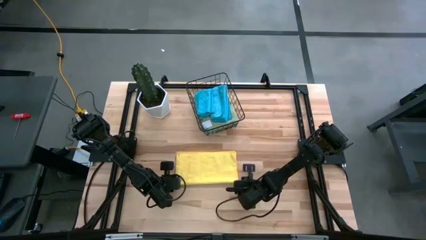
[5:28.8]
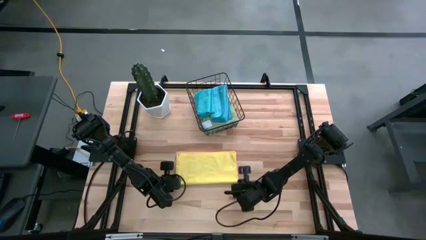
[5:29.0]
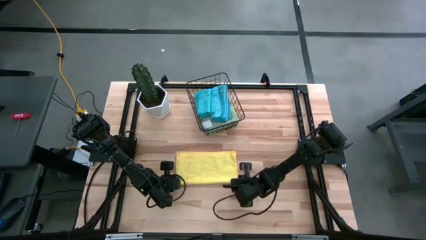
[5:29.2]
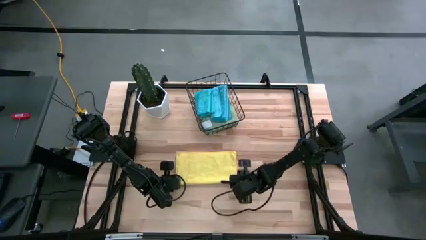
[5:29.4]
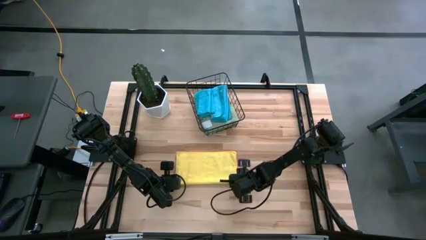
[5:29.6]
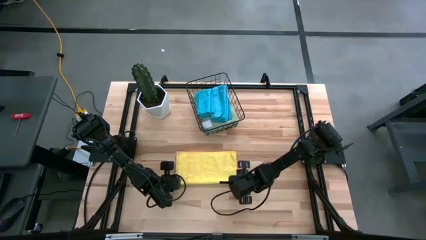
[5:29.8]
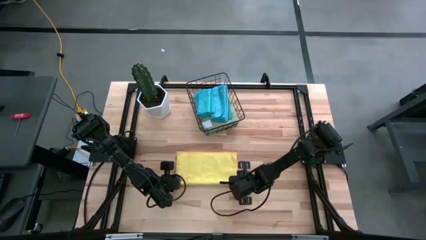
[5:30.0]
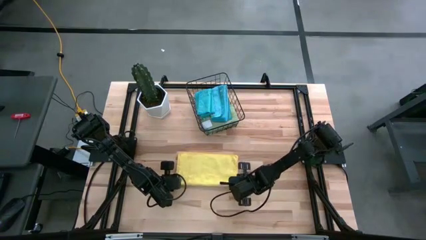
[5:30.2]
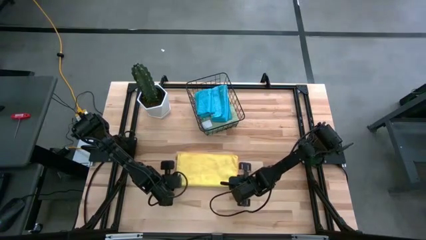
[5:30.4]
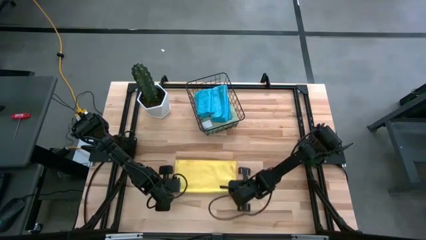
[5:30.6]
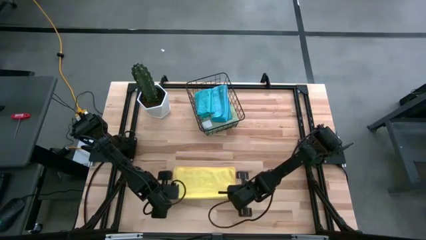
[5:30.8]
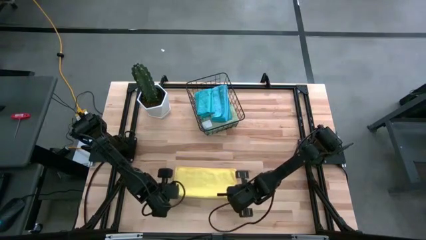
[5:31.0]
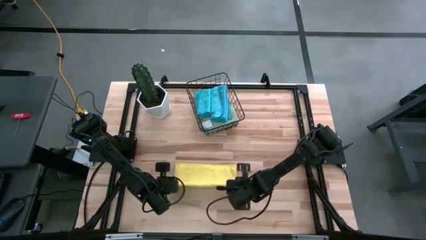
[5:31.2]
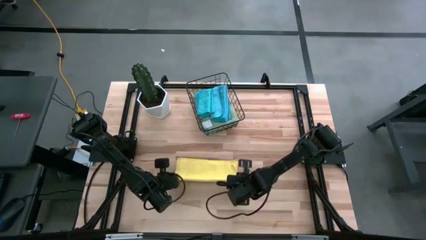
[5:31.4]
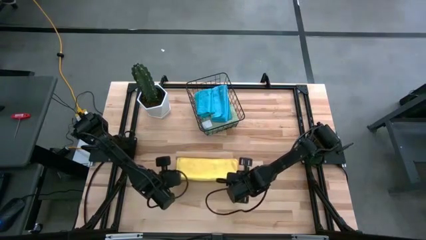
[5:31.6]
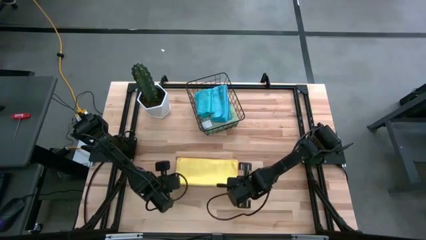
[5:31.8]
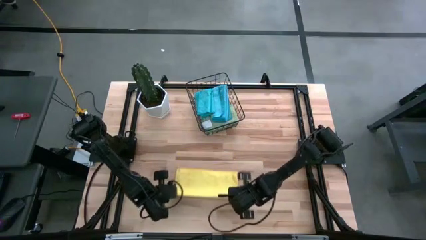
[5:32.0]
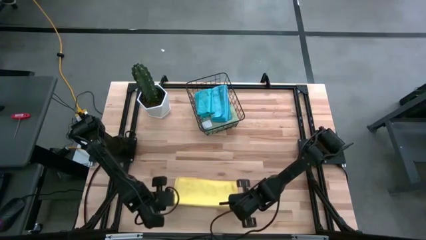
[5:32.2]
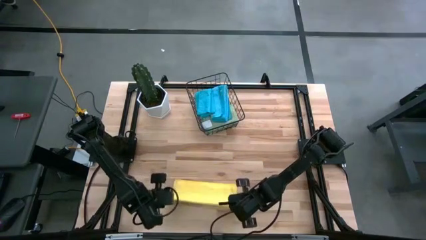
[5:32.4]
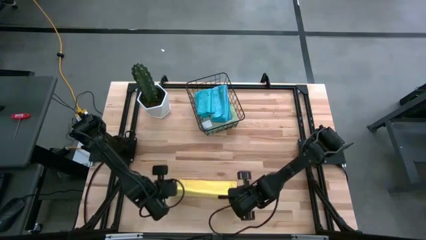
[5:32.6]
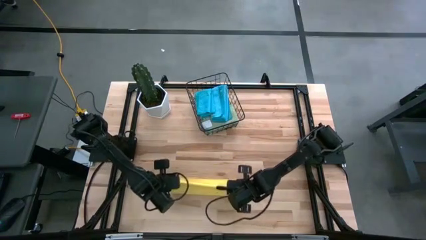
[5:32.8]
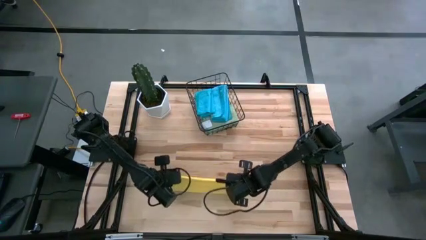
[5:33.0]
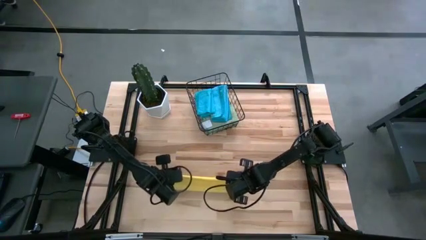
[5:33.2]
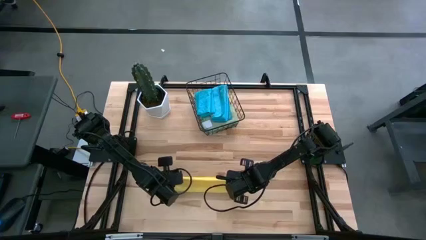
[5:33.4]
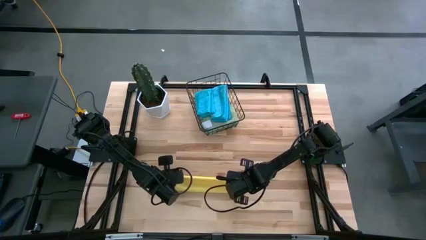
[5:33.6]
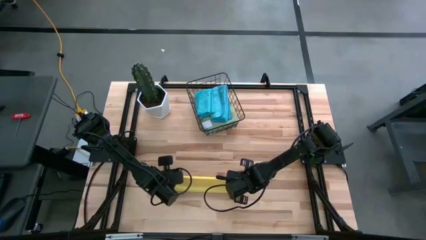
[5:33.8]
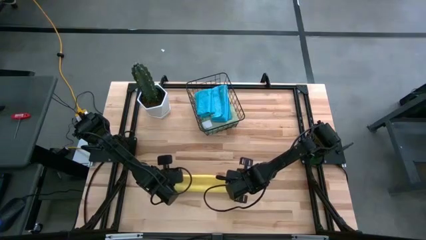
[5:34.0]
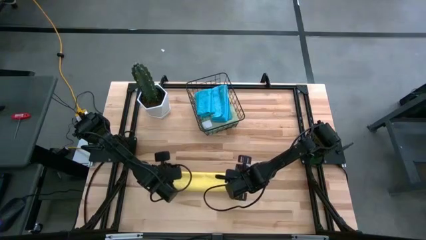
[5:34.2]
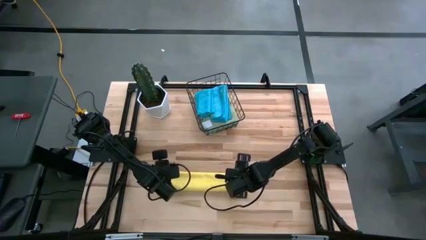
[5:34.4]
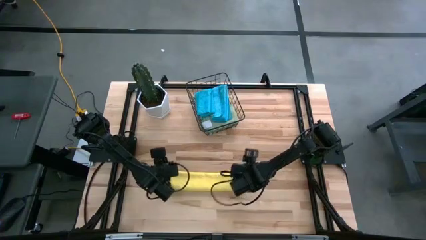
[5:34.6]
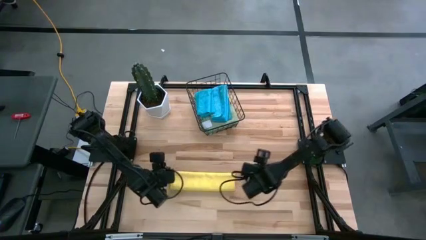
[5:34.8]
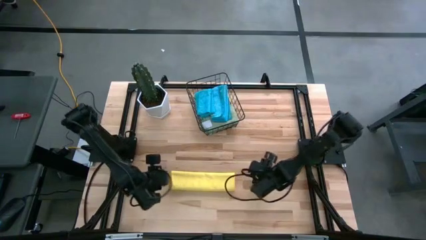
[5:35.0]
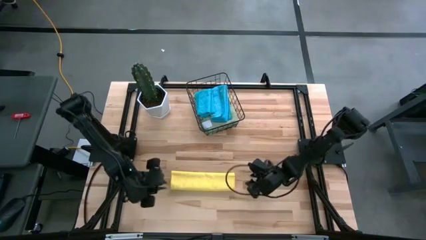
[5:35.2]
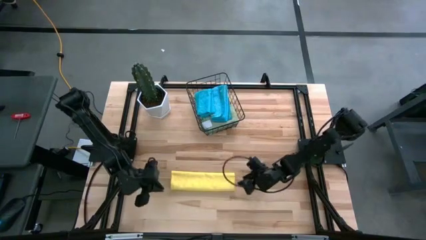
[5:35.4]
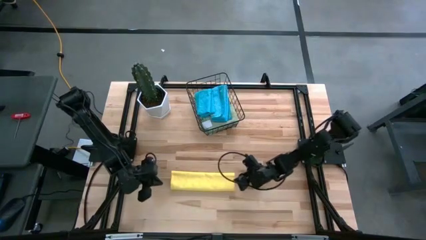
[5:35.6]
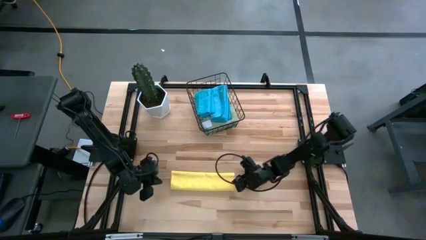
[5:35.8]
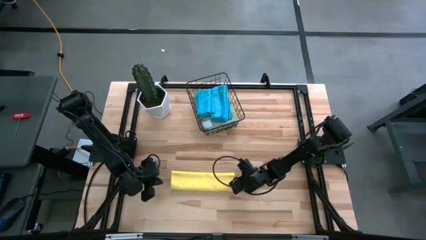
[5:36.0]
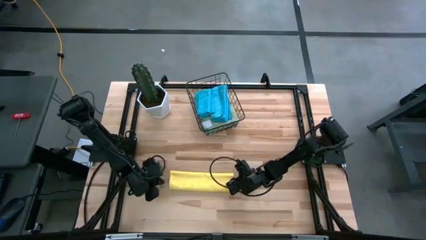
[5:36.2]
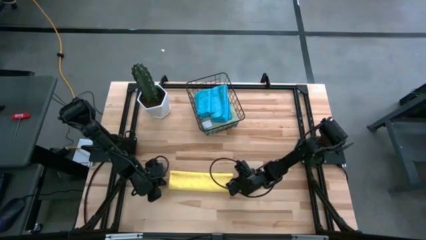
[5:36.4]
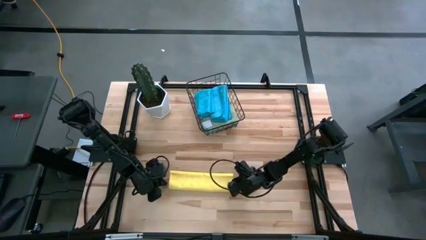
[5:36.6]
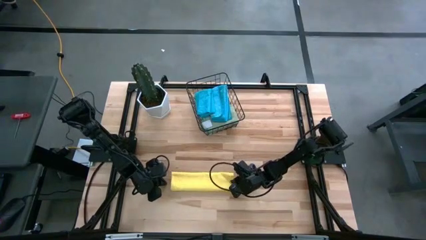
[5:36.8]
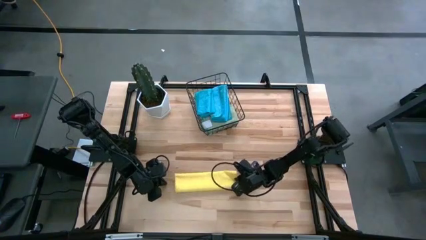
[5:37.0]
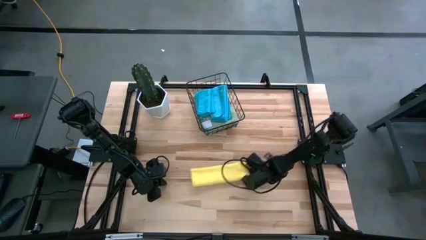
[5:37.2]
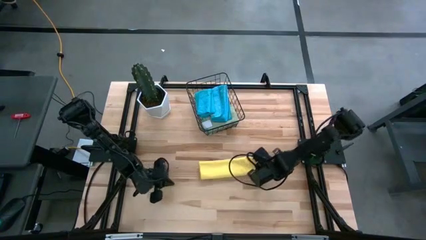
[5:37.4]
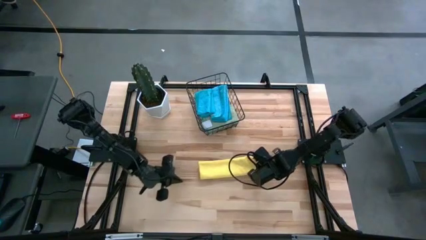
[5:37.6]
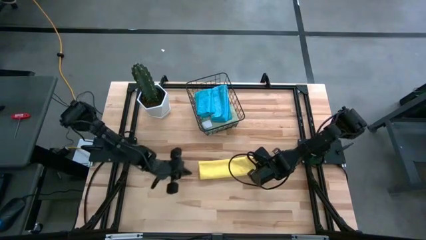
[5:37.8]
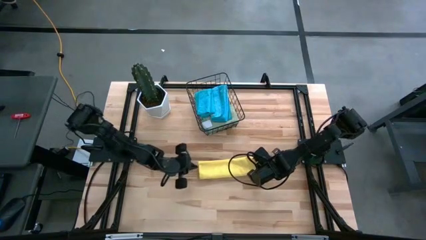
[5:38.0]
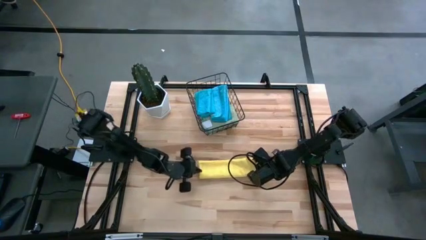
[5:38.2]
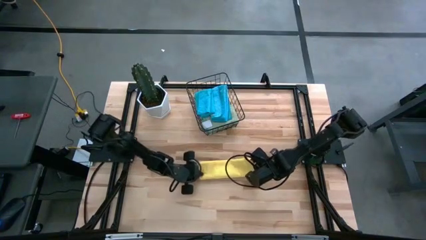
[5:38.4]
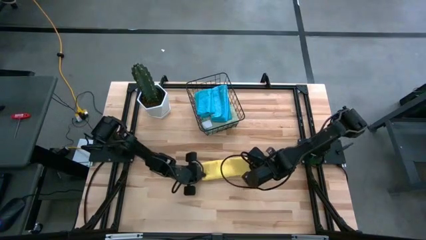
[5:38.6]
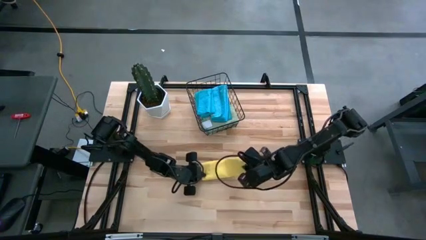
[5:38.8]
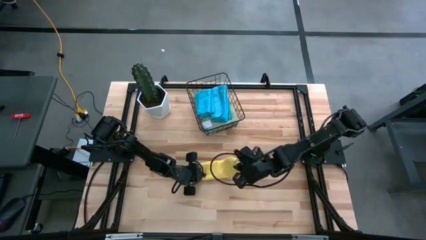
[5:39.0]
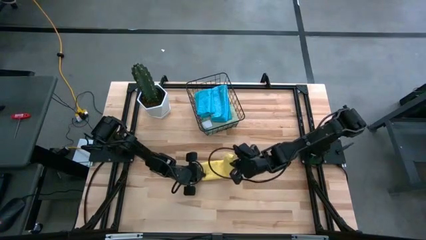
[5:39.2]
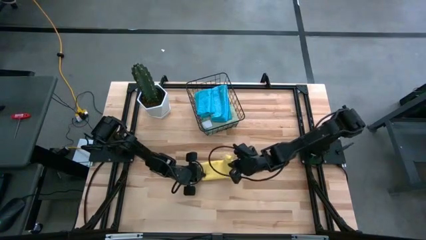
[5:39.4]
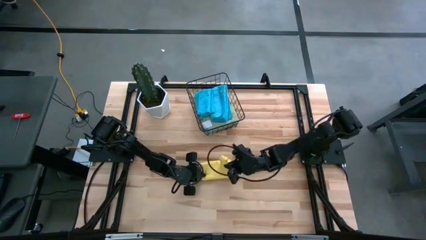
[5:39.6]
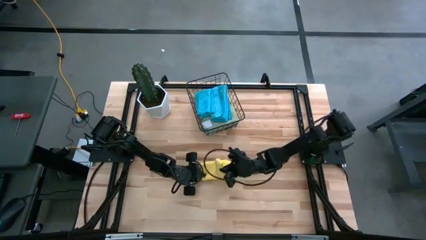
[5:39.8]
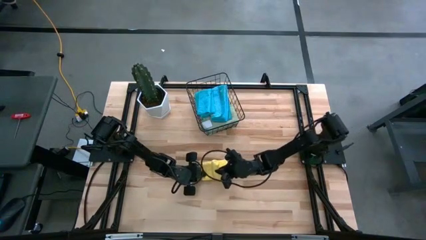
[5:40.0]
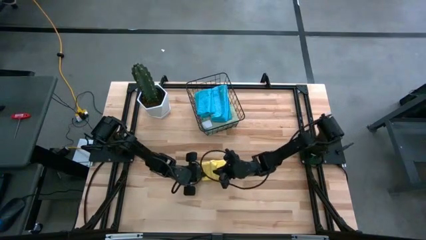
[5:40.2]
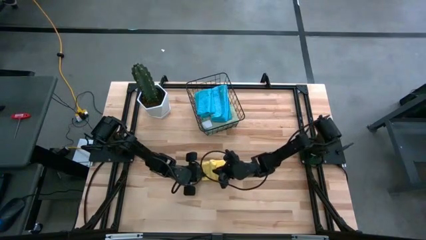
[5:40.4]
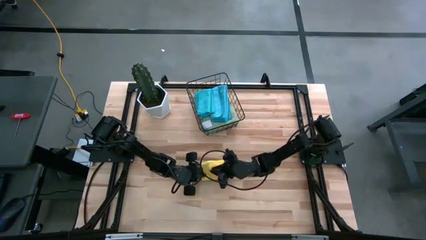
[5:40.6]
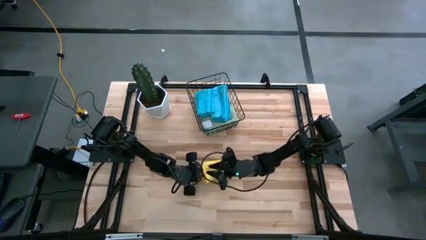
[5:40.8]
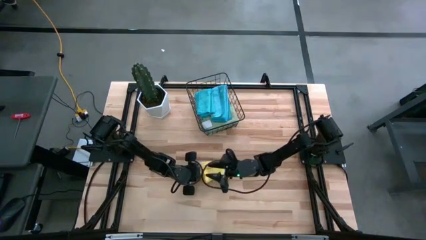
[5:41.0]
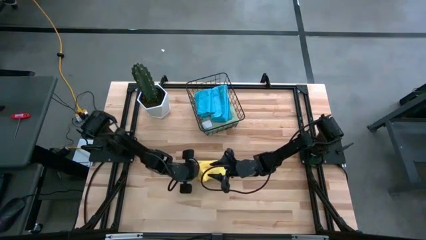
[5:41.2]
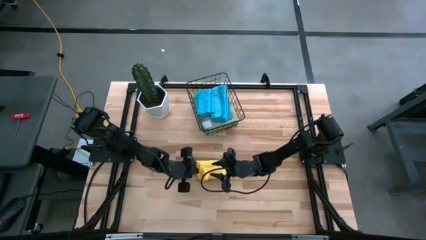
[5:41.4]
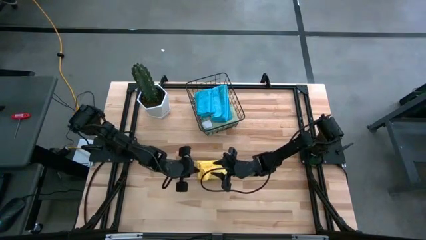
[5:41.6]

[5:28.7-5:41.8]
Task: Fold microfiber towels
Fold the yellow microfiber cloth

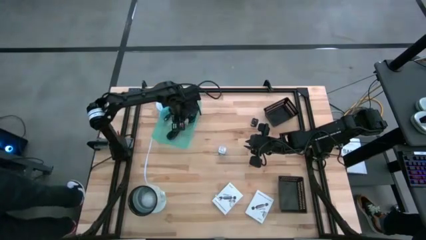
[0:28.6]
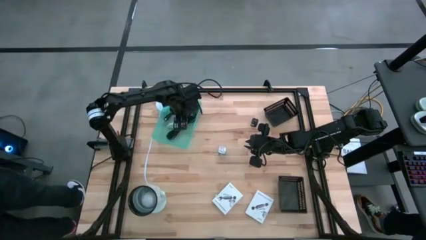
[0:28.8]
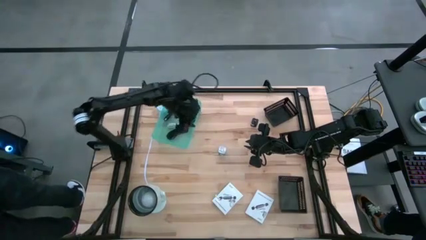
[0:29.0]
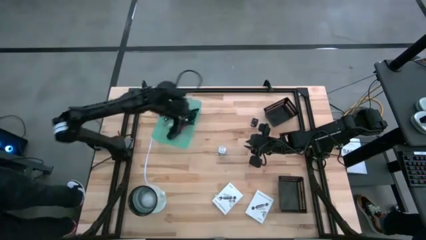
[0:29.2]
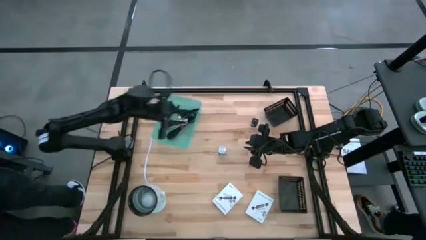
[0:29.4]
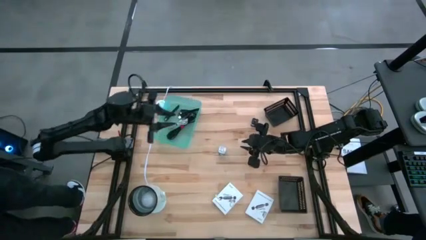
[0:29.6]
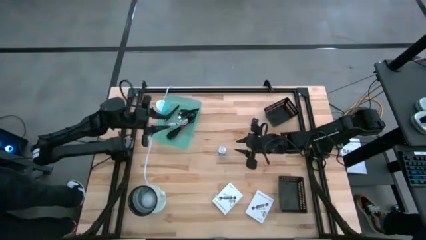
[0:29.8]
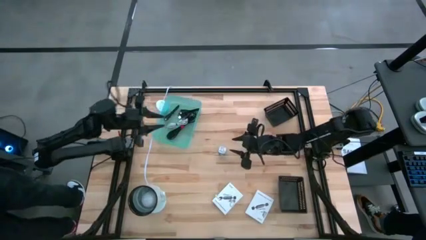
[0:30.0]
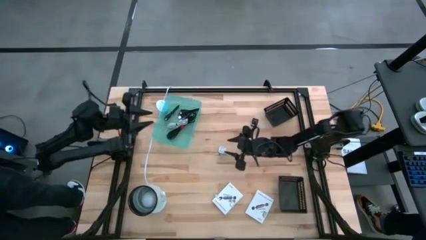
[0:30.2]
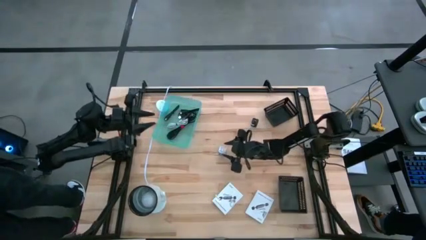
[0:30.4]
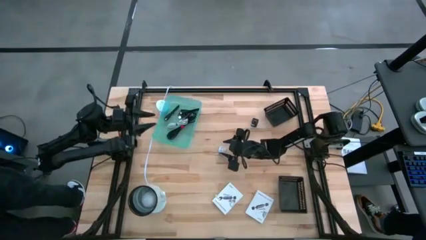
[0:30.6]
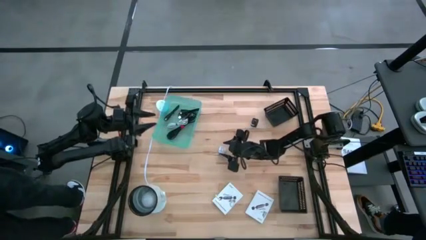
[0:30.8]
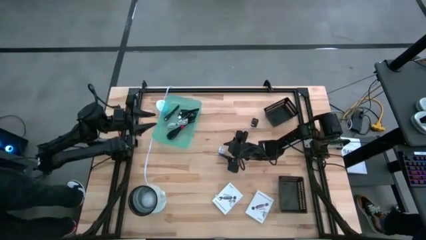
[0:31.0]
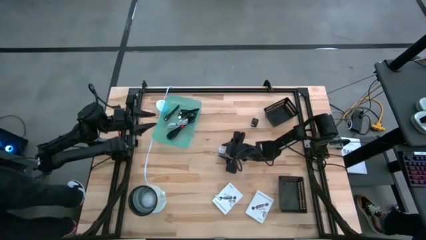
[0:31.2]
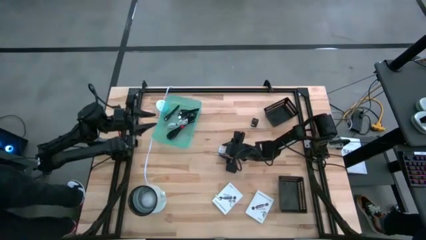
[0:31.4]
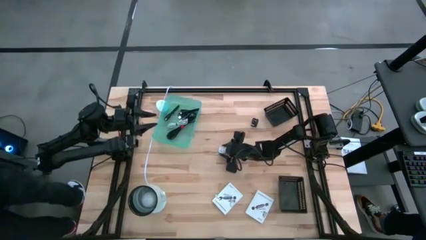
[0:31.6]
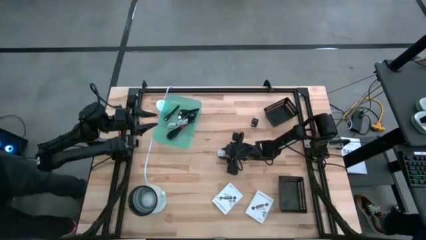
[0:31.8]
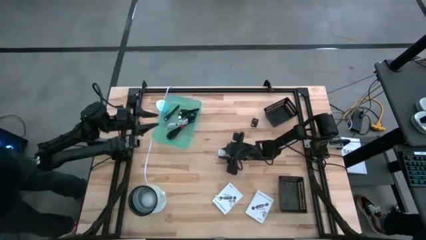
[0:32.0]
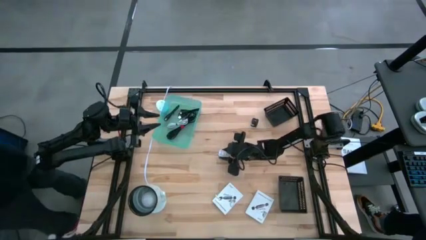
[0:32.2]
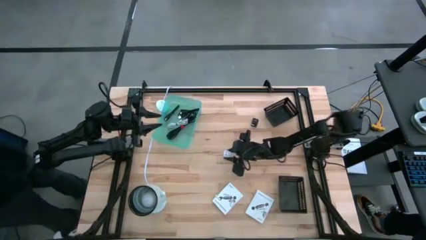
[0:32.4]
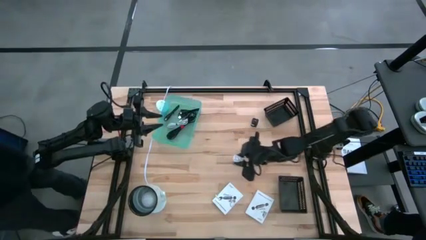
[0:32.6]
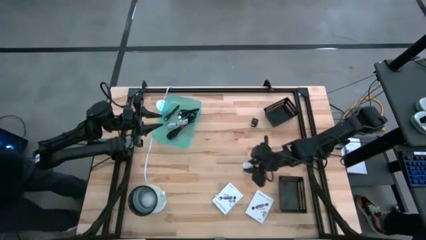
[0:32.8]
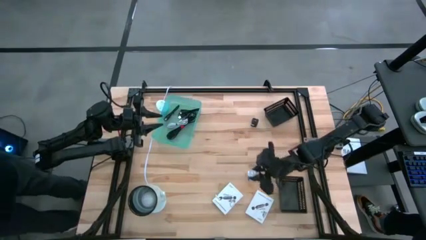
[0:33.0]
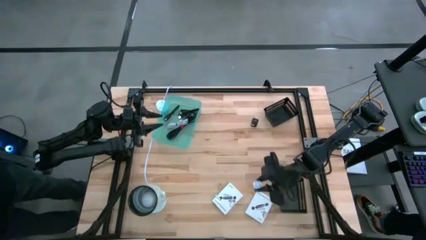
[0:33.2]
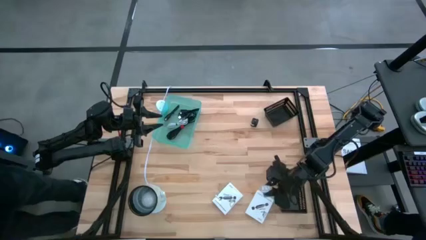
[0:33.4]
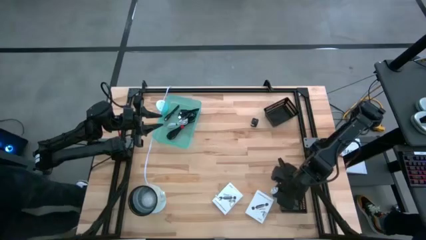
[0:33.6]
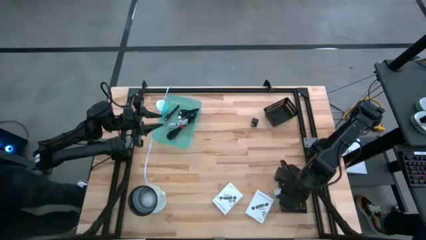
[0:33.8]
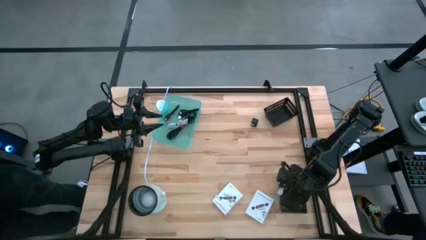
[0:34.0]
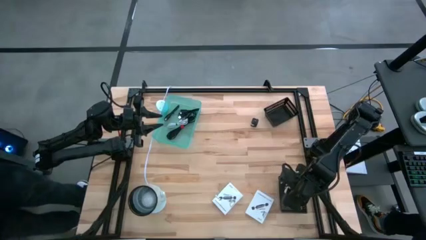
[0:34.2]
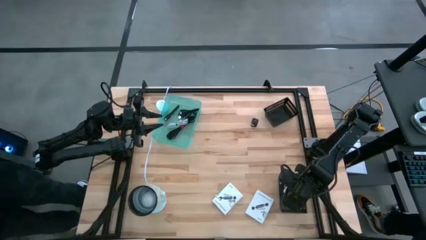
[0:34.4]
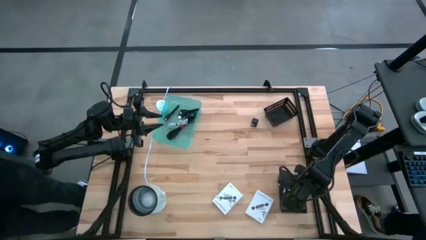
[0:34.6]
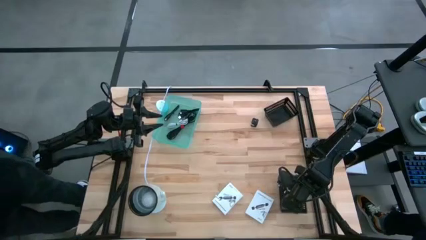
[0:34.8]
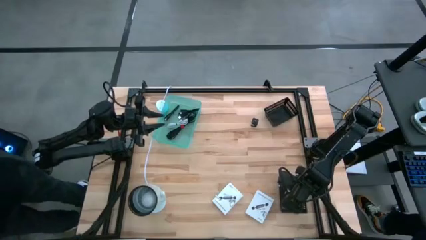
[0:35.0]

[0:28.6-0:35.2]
Task: Pick and place items into bin
Put the blue charger adapter into the bottom black bin
